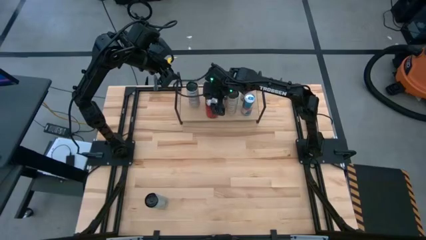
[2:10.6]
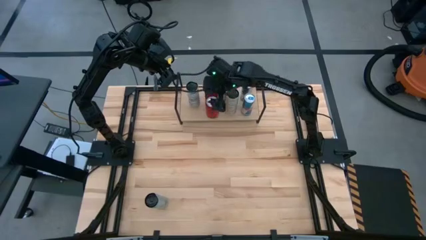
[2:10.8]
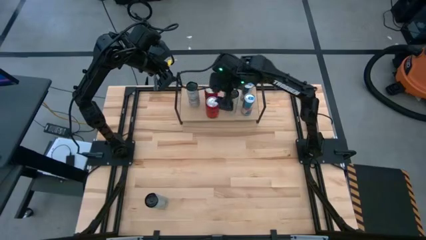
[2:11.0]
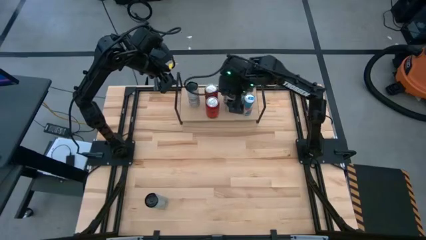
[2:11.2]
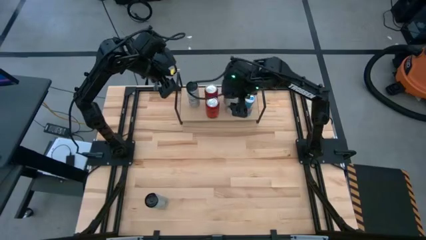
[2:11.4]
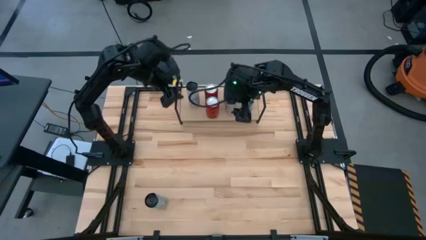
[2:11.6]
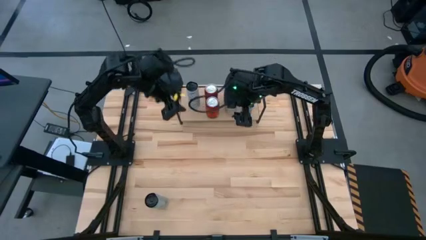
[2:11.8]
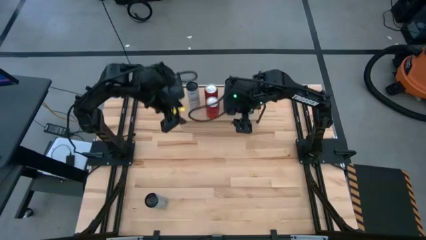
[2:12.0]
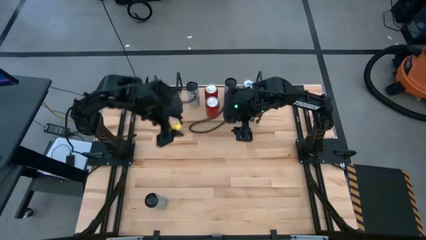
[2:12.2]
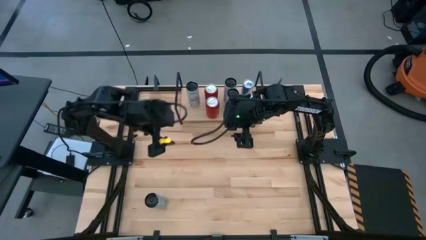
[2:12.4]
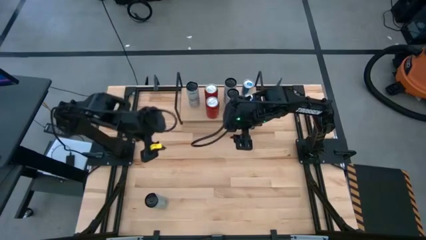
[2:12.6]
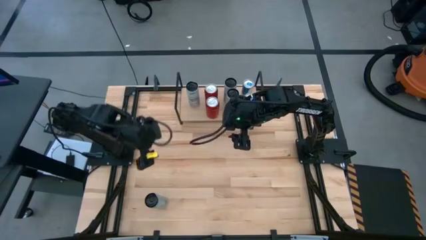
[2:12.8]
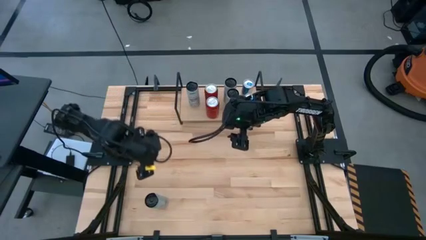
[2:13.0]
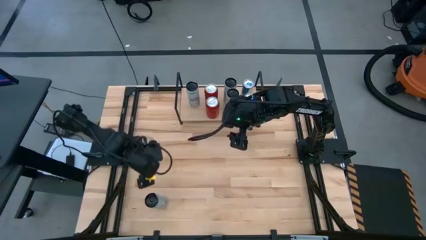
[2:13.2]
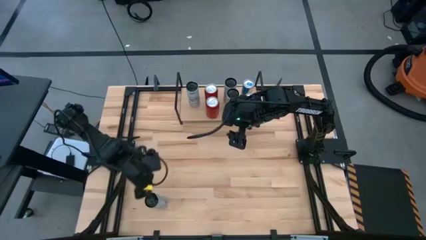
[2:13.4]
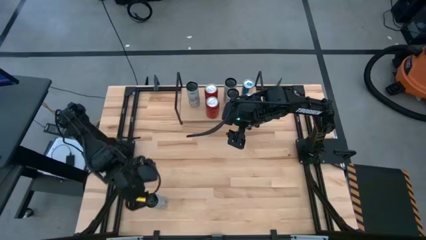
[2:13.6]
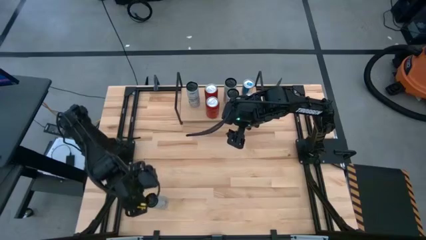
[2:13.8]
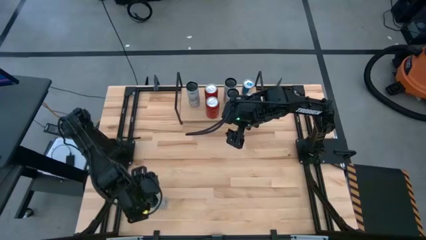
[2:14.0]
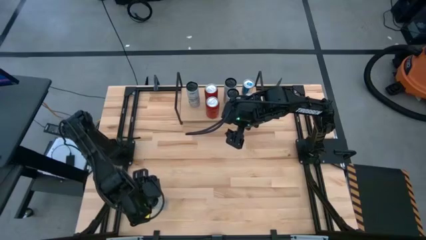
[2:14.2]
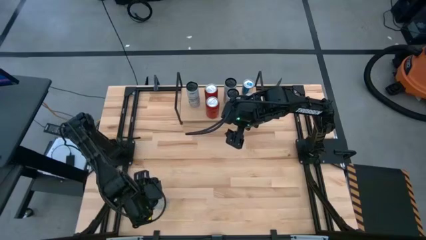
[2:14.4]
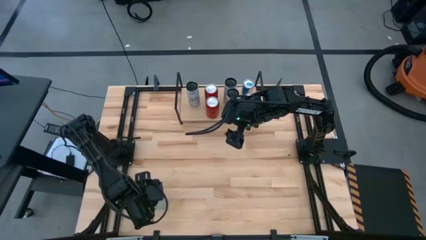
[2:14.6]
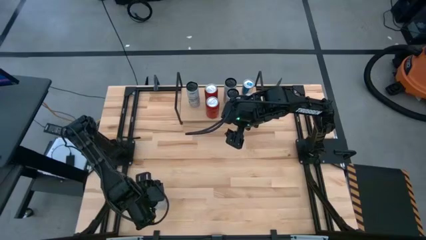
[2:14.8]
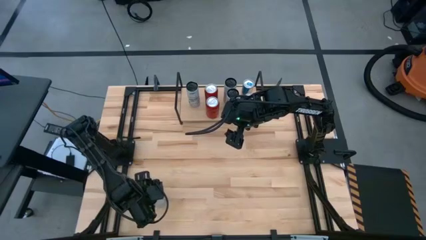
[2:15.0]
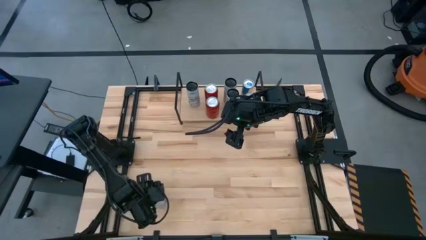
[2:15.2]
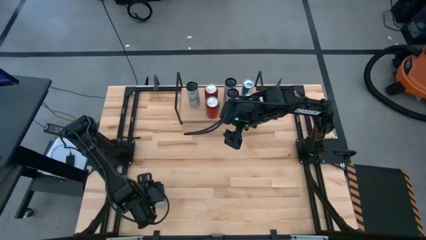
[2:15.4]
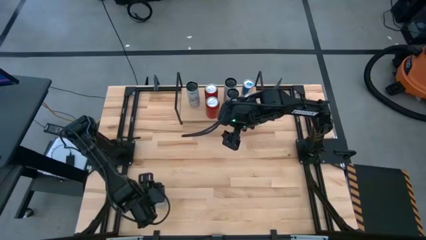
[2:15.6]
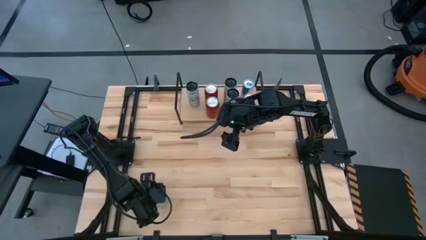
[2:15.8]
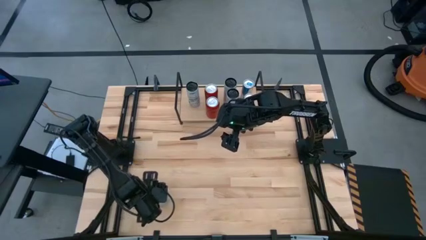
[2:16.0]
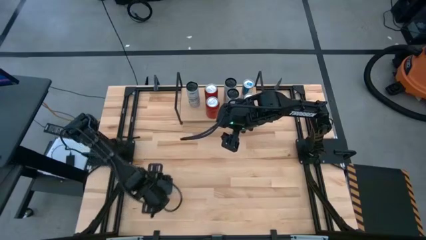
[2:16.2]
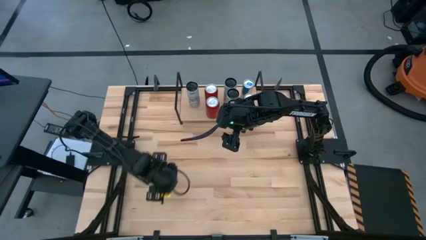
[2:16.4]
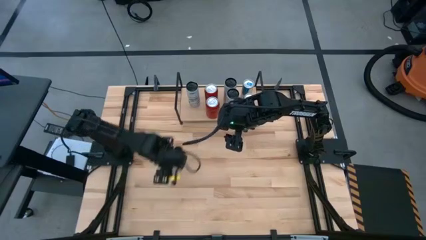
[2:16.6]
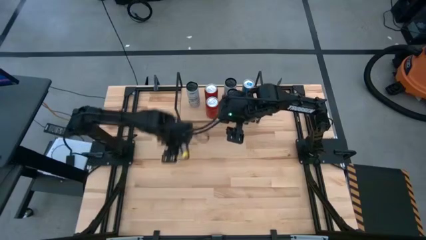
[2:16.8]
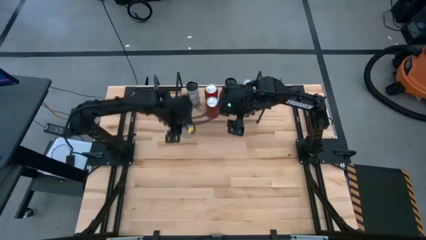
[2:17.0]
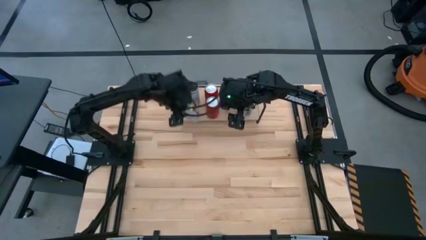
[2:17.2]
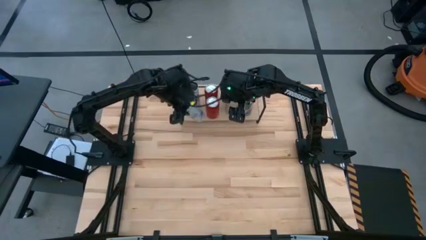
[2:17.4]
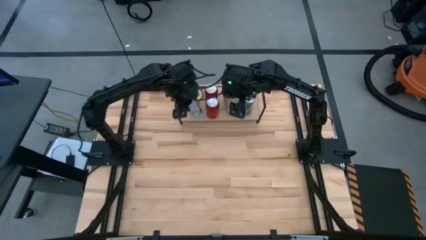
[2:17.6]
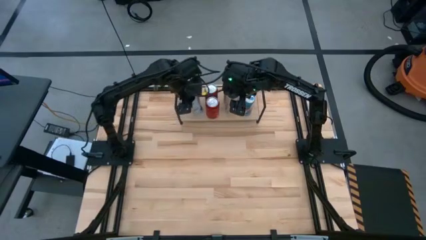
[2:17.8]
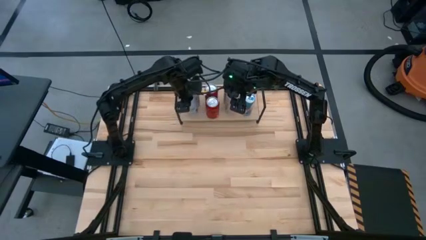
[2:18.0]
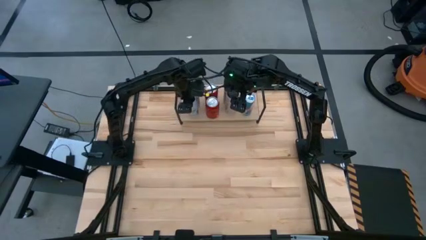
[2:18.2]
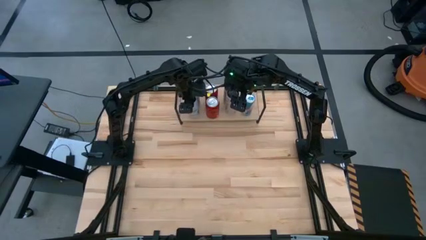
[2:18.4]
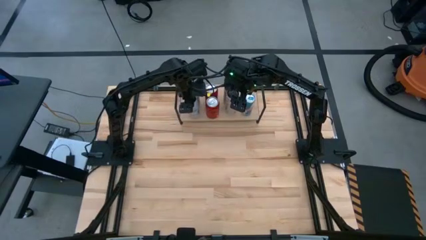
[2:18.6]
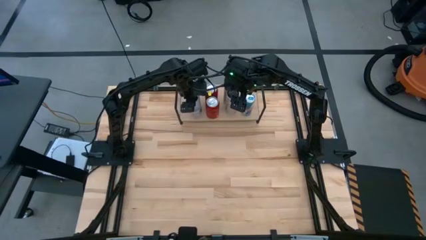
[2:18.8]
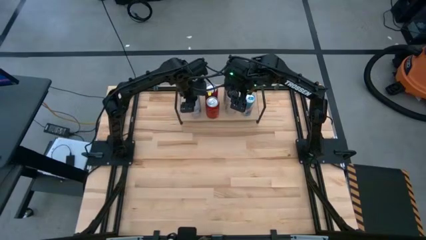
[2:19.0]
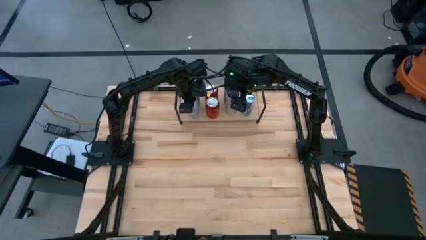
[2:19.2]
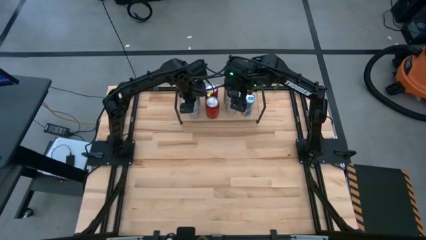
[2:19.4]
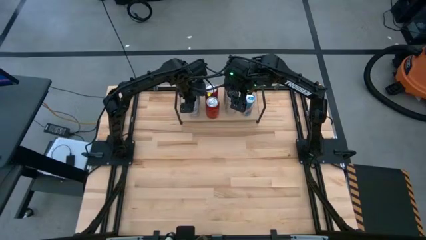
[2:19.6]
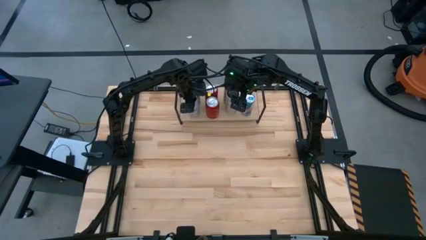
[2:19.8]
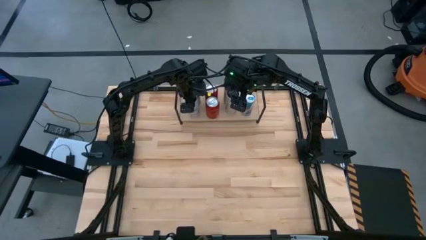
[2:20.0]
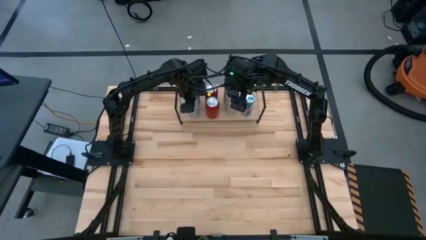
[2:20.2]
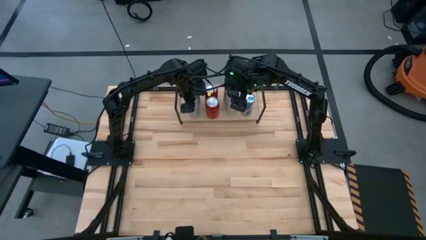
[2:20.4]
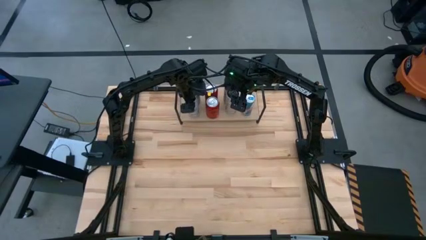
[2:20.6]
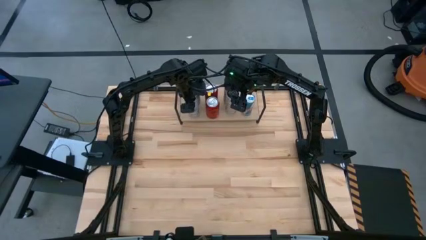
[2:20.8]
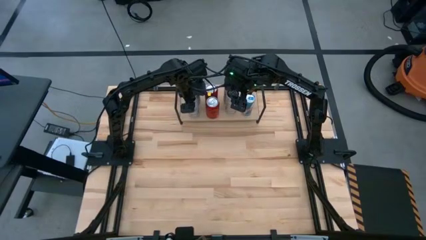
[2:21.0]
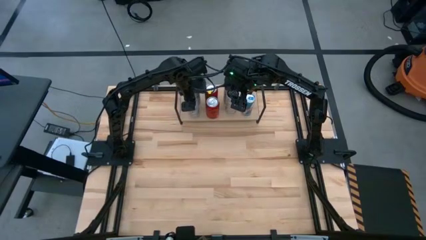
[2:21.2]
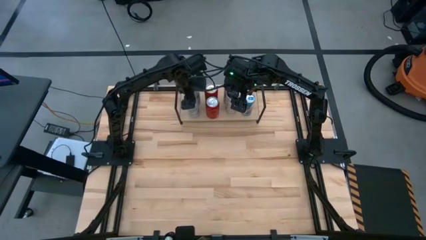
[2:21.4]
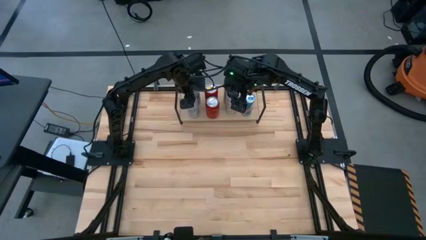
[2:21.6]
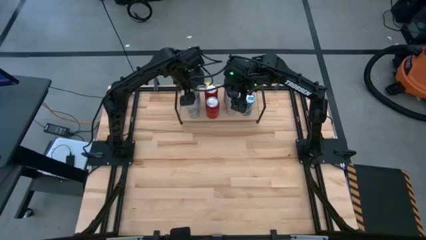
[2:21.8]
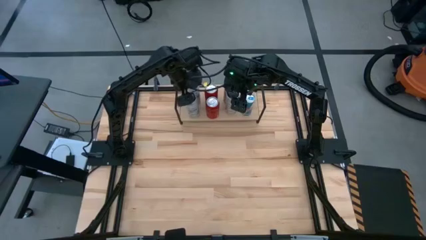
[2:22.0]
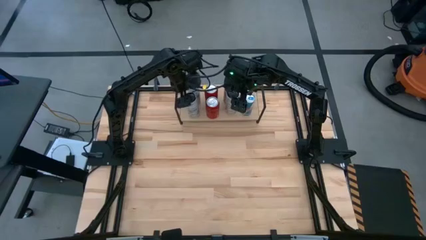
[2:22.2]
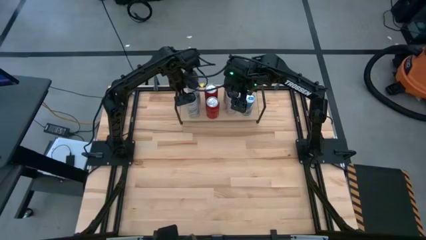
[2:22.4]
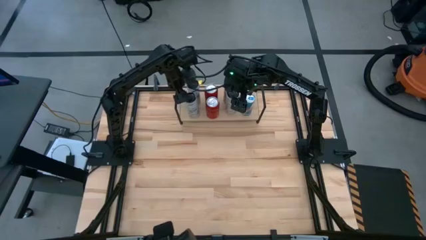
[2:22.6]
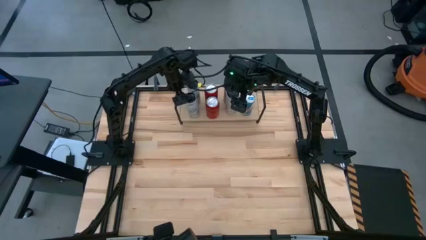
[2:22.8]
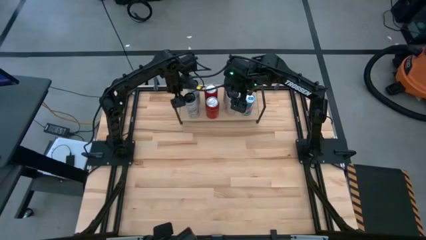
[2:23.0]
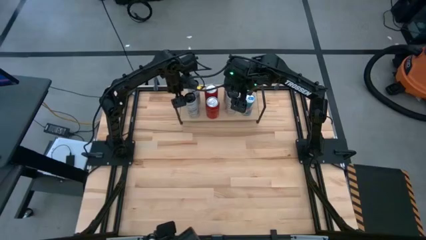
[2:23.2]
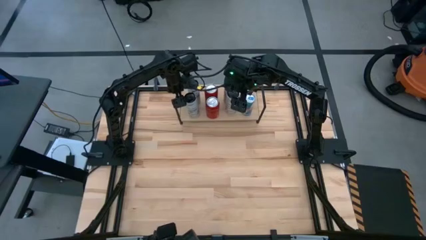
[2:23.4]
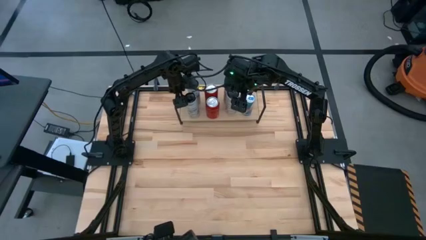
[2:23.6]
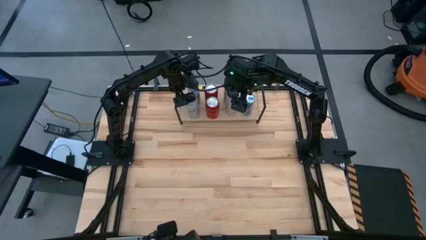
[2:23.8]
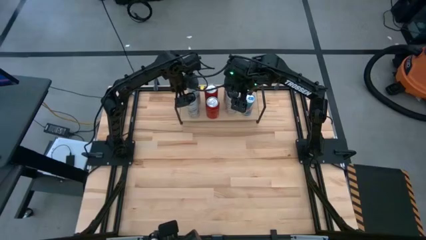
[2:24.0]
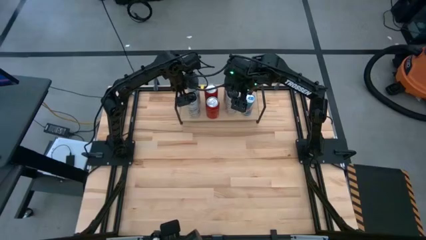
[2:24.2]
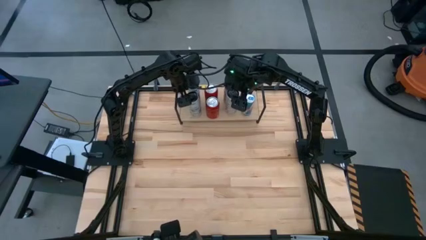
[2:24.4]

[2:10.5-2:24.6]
Task: Place canned beverage on shelf
Put the white-blue soda can aligned with the other white-blue soda can on the shelf

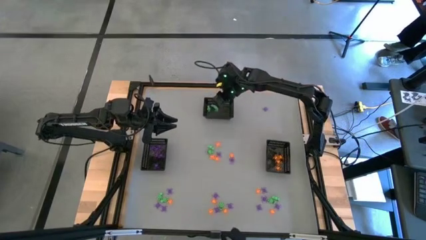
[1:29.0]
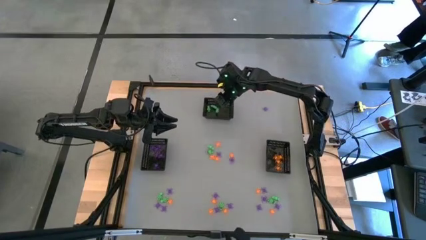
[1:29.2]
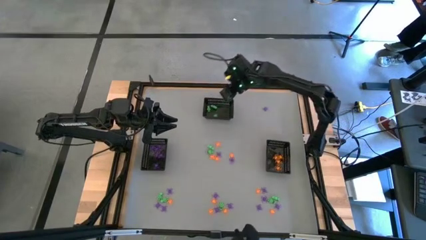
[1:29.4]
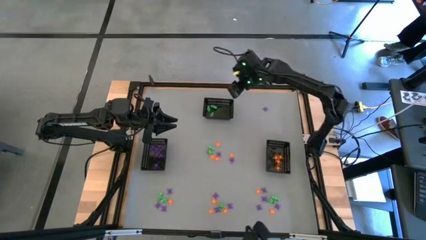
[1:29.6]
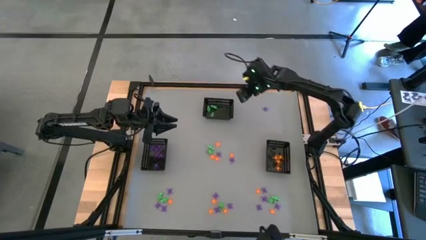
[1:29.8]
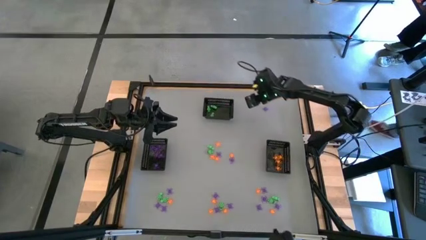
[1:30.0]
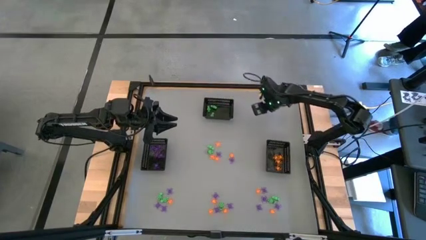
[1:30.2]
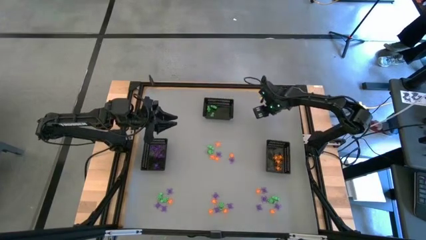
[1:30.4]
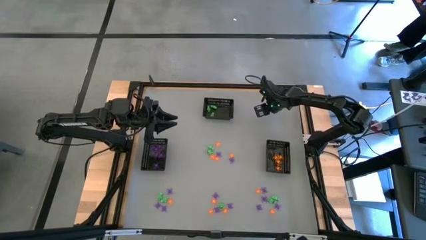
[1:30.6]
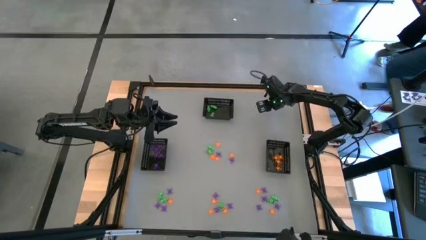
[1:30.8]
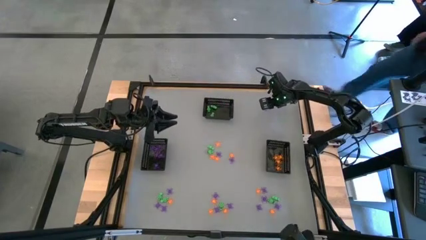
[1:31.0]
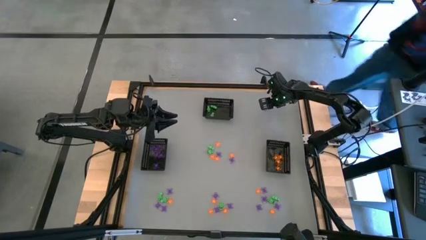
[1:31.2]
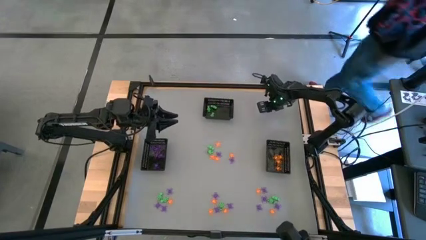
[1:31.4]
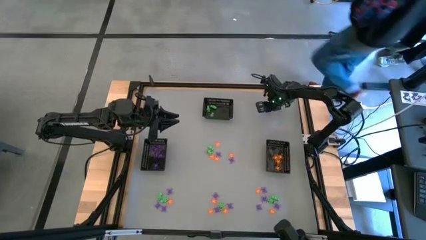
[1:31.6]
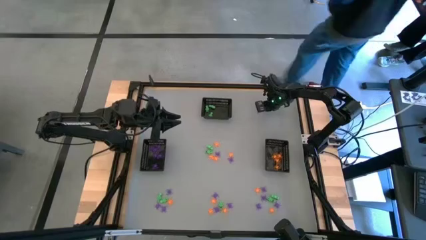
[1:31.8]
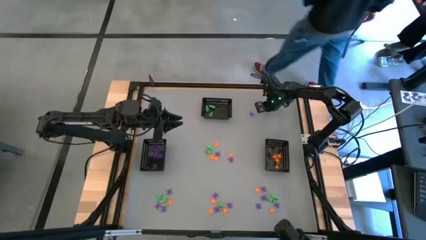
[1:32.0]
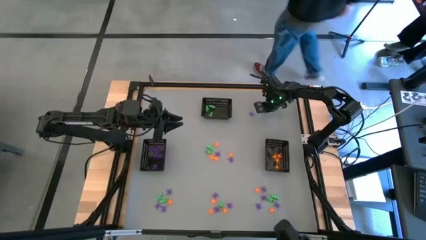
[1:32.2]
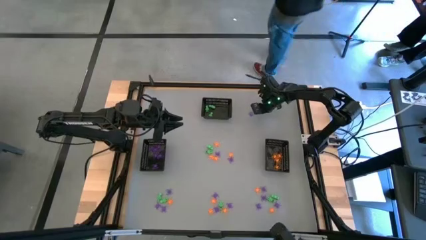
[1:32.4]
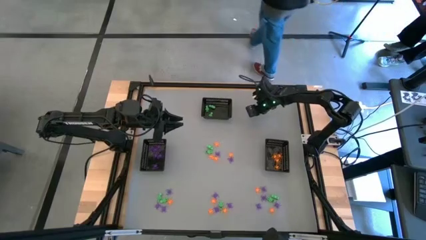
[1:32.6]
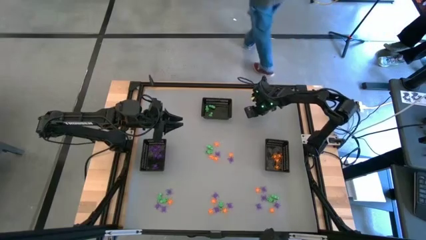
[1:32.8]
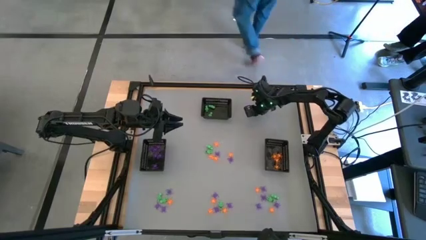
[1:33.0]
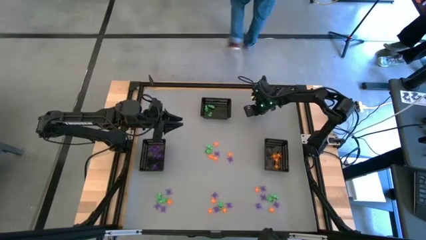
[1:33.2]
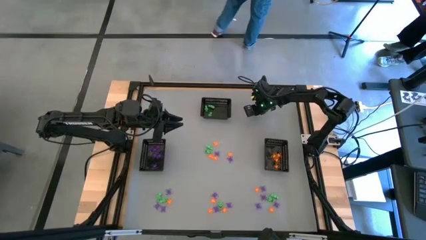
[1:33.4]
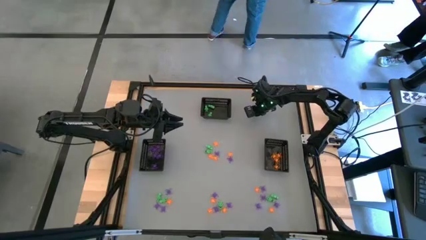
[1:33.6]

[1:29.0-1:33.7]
Task: Sort Halloween decoration
Put the violet spider toy into the left bin
